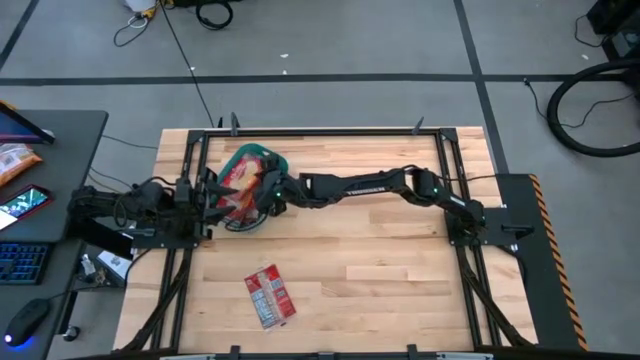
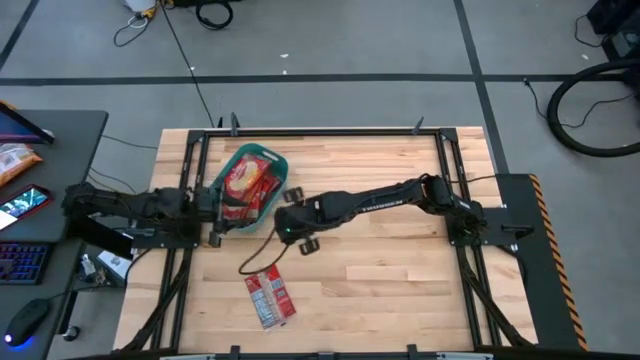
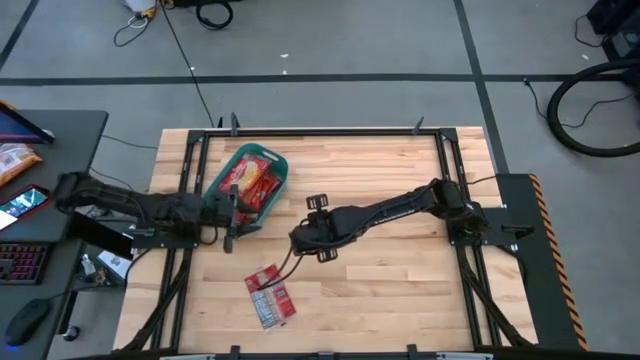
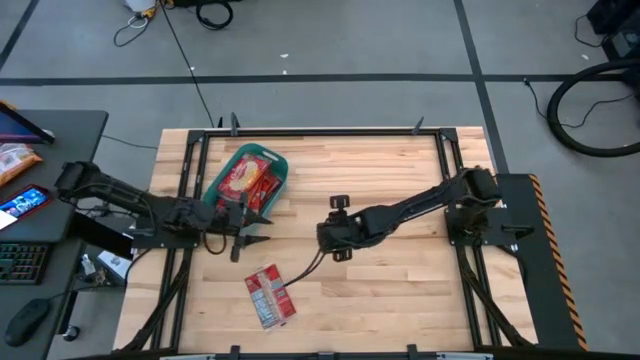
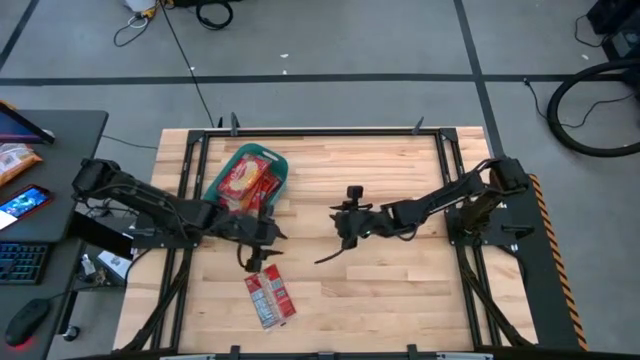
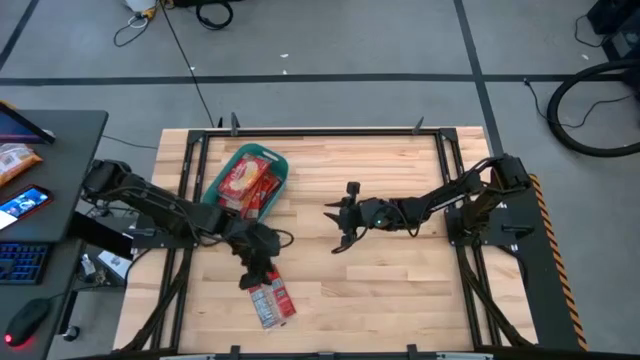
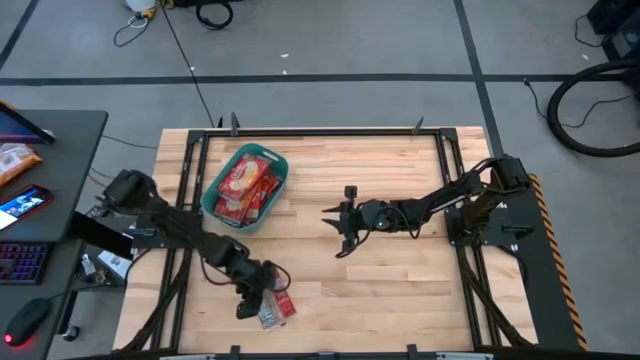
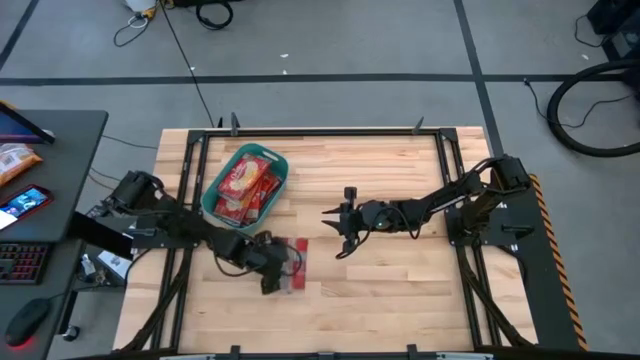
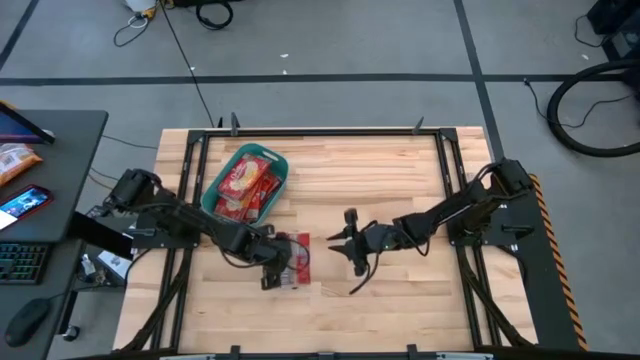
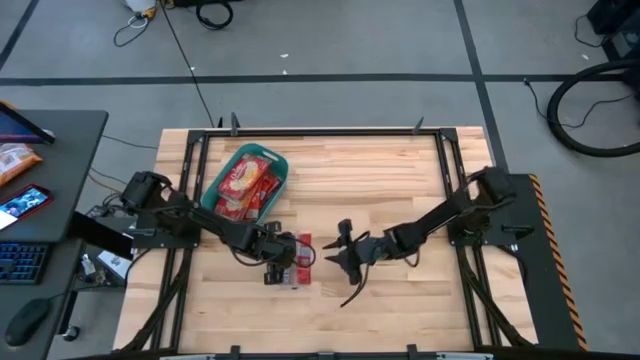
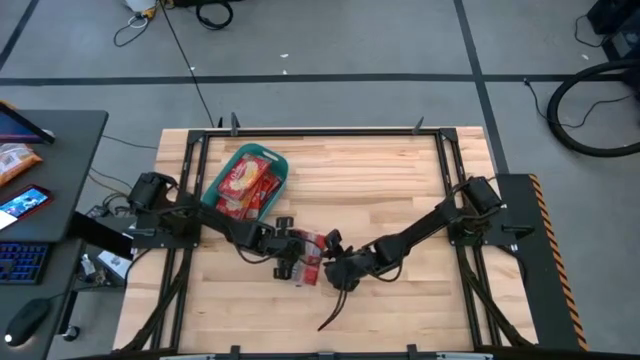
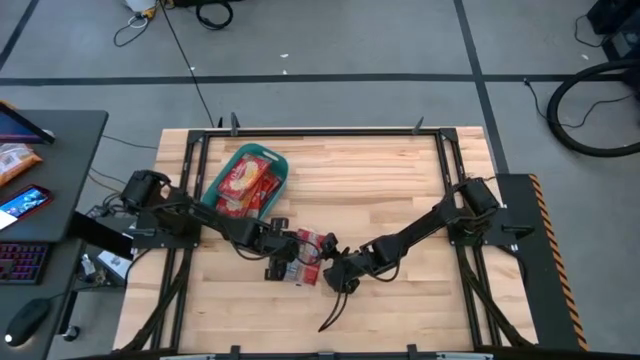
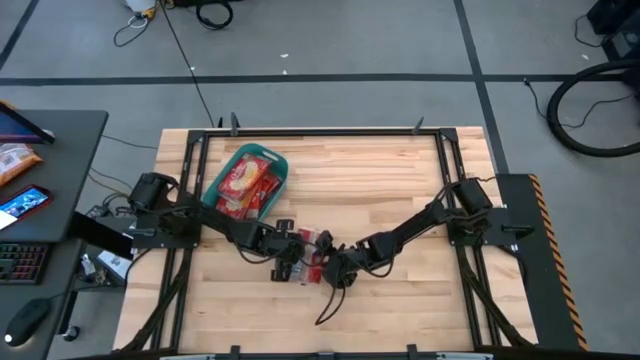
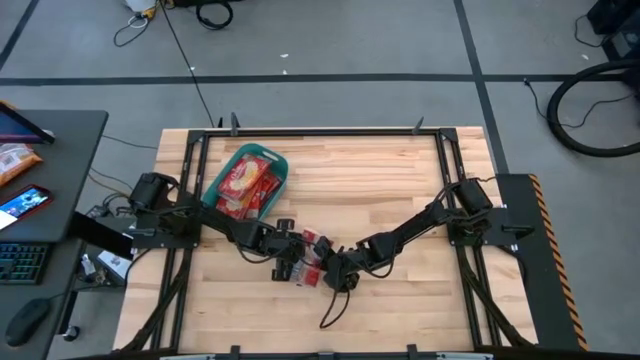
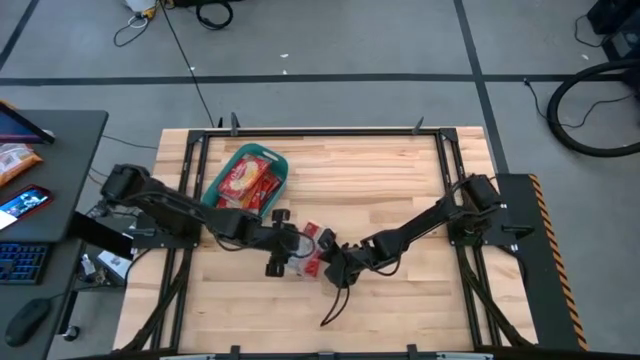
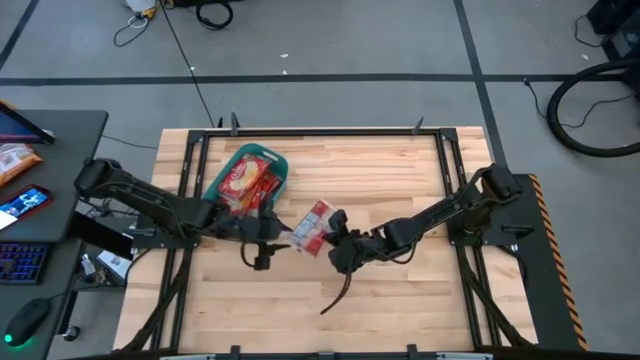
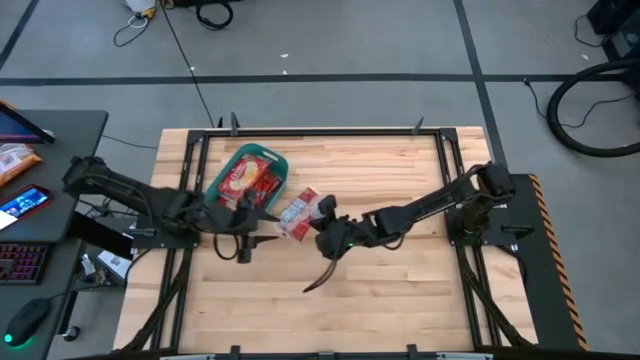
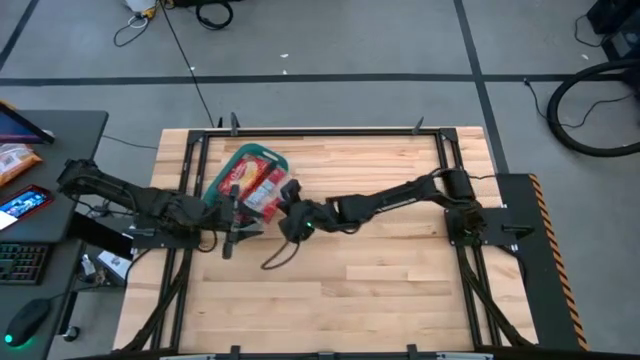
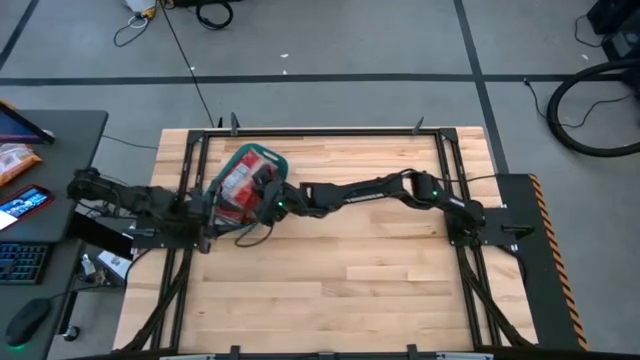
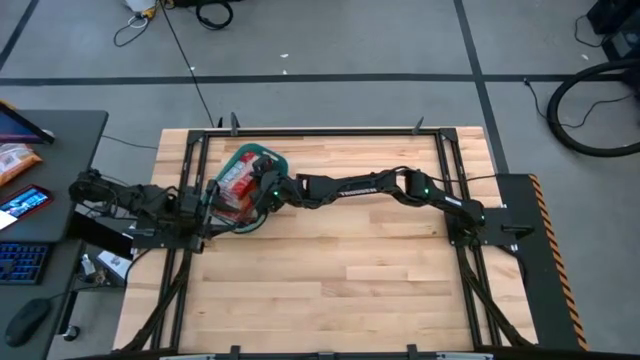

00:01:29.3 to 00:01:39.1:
Task: Sort popcorn bags into baskets
Put the red popcorn bag into the green bin

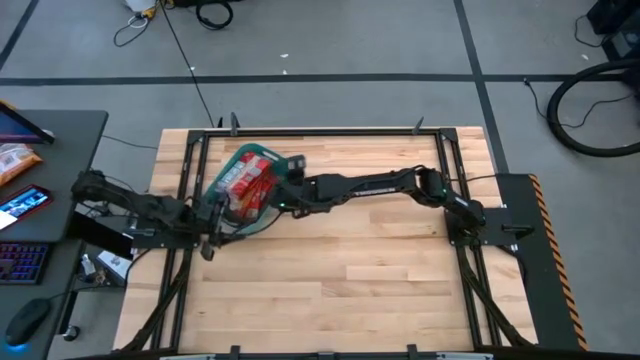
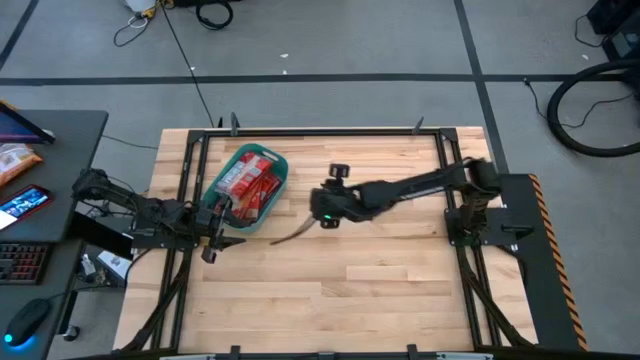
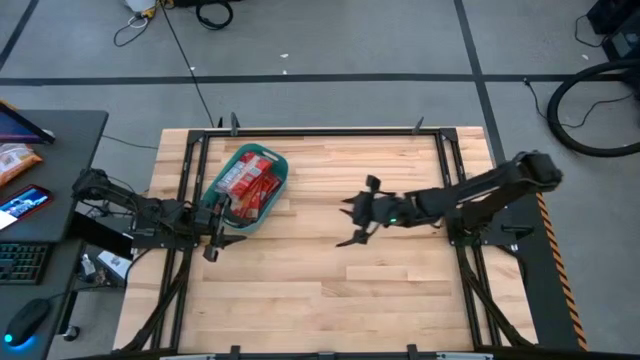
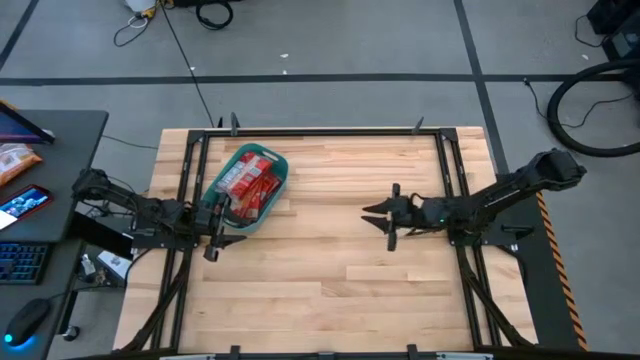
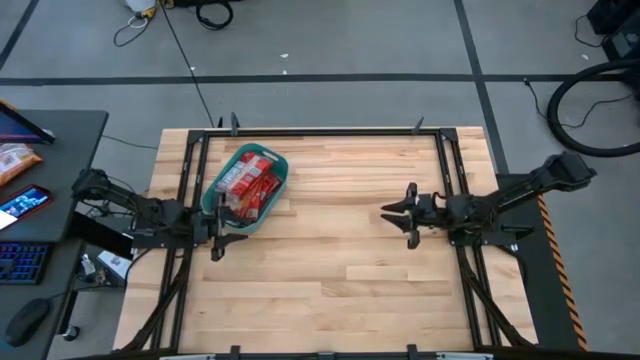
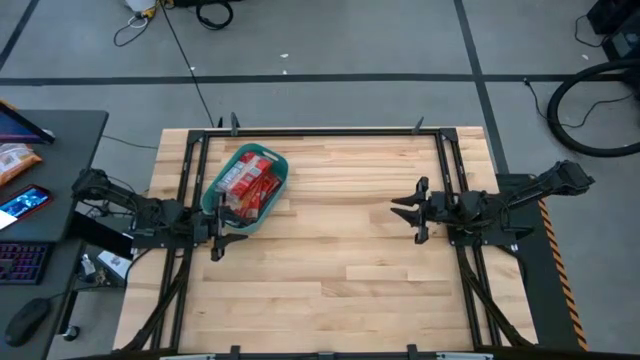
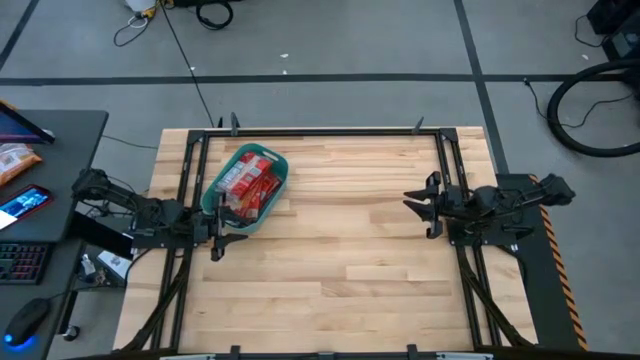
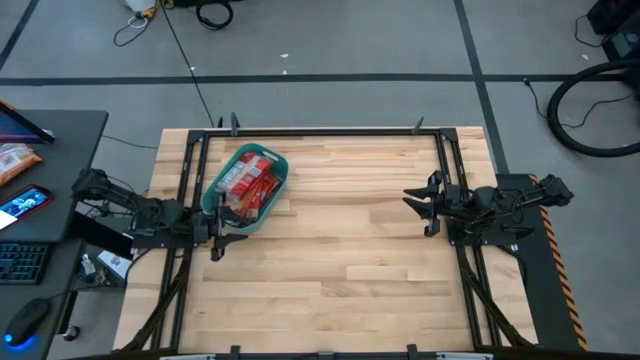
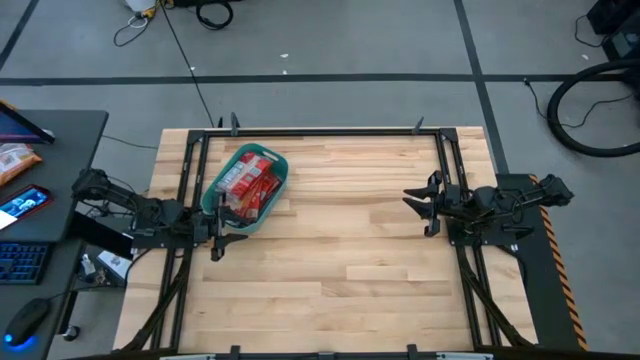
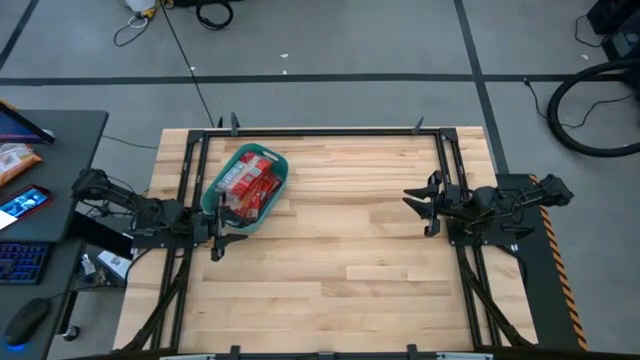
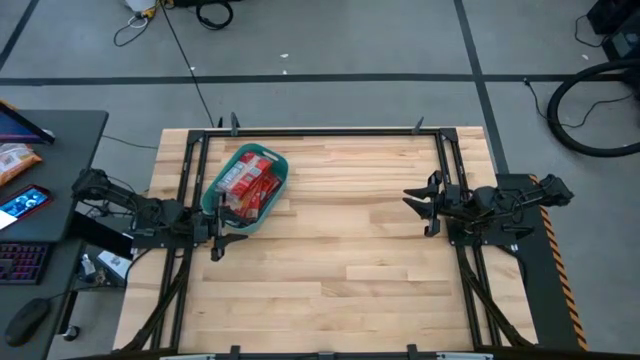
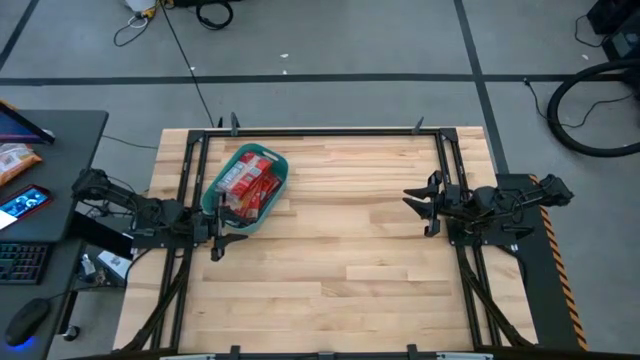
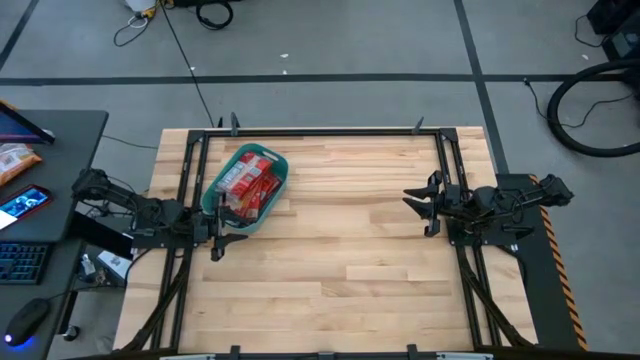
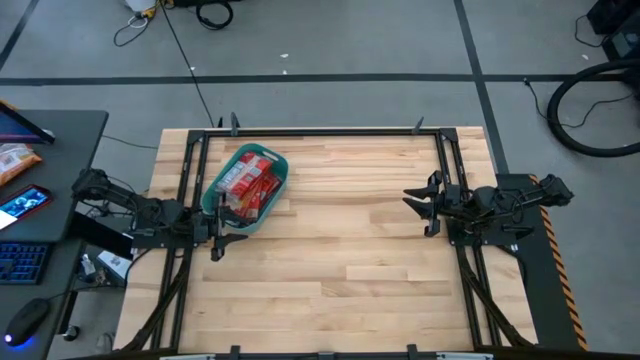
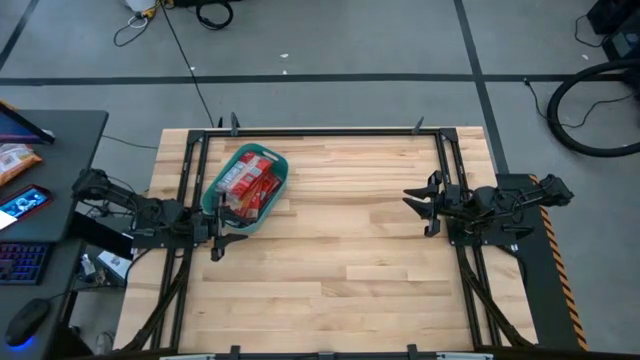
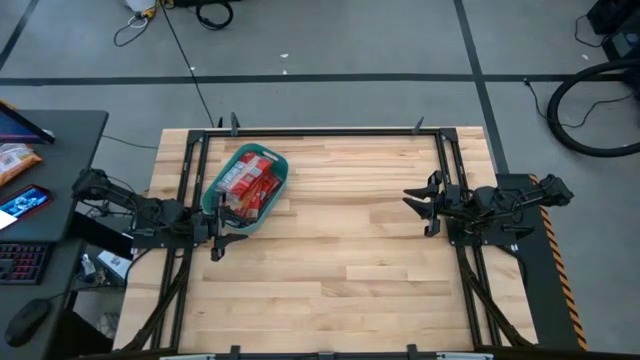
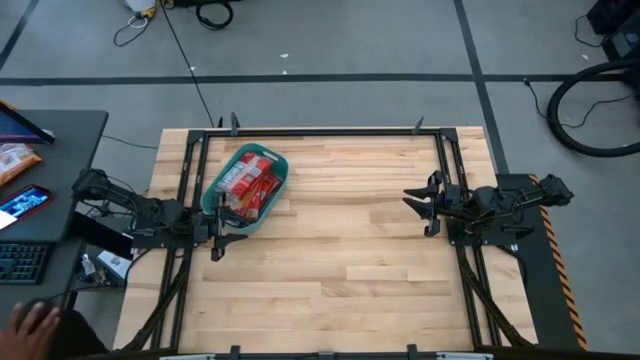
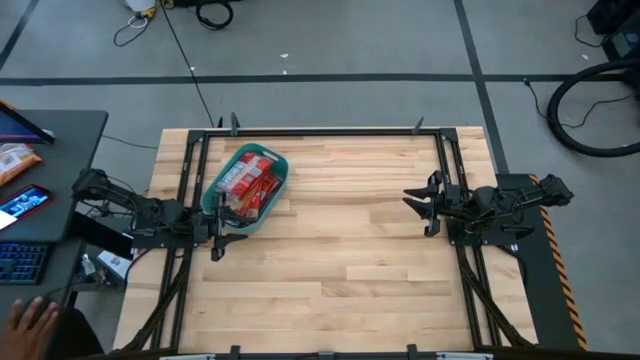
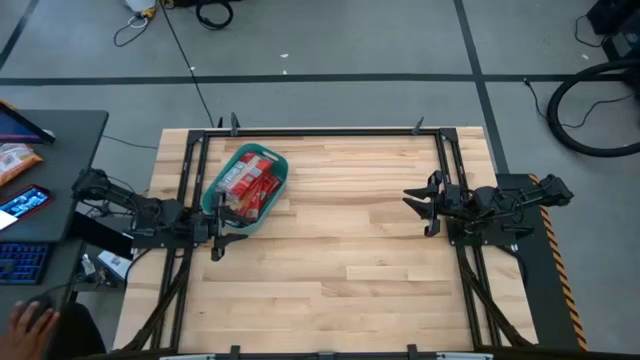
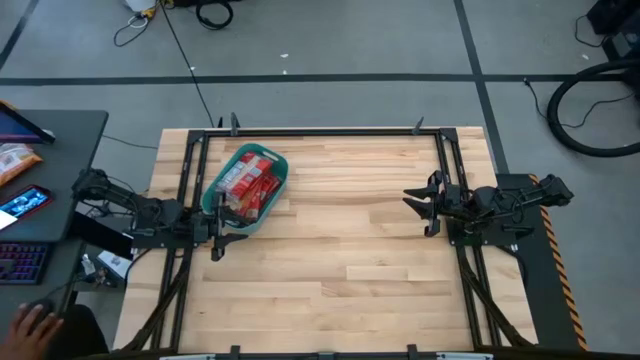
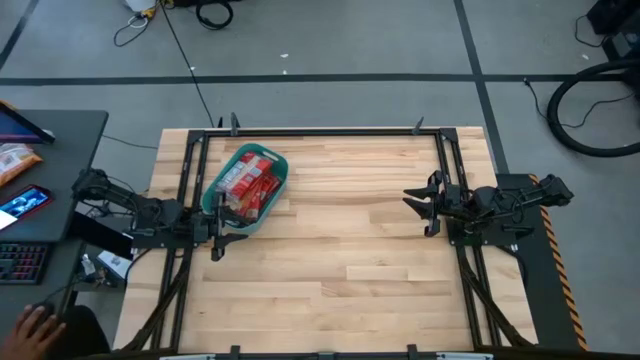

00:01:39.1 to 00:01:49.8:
Return to Home Position
